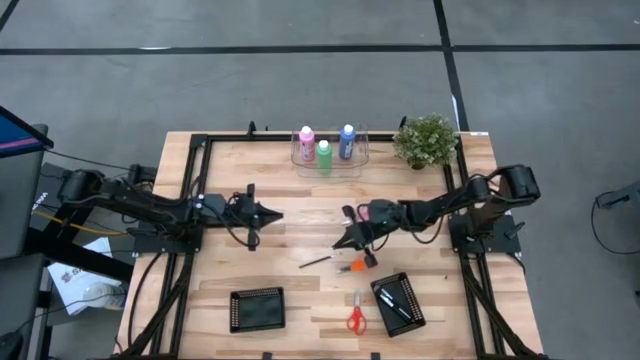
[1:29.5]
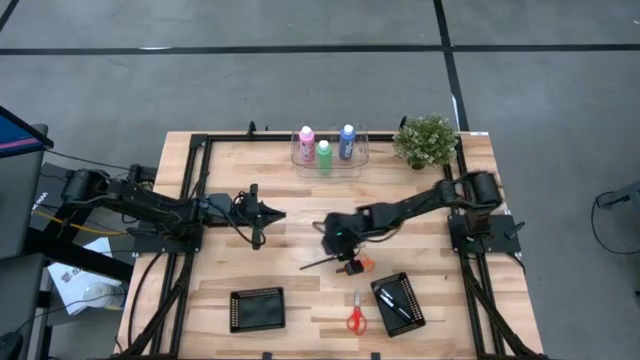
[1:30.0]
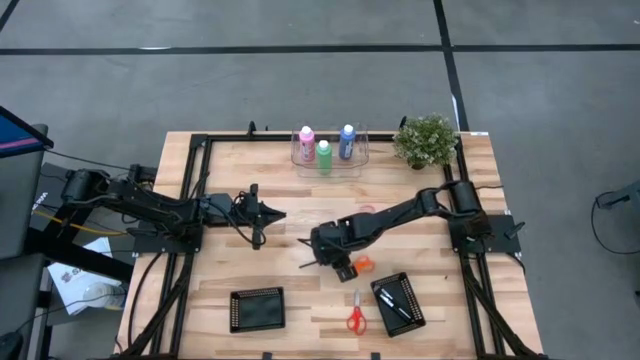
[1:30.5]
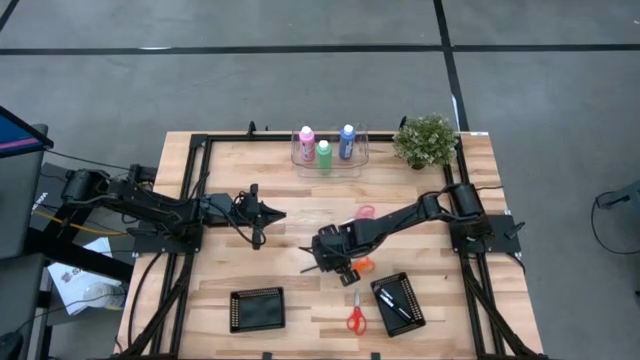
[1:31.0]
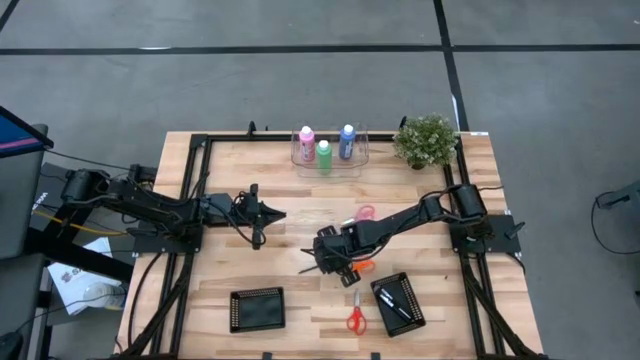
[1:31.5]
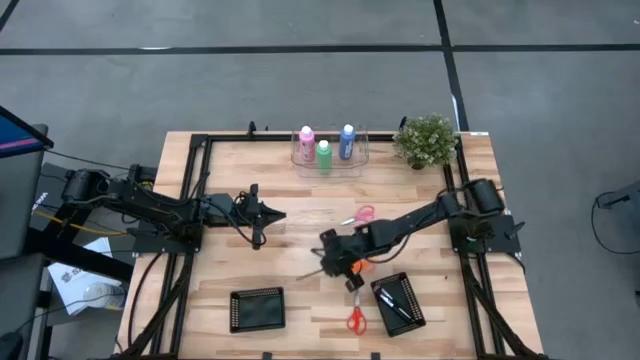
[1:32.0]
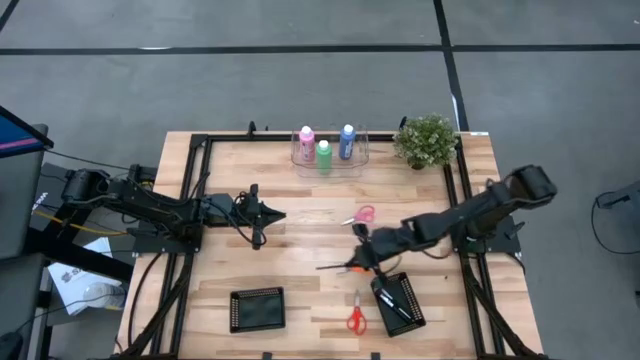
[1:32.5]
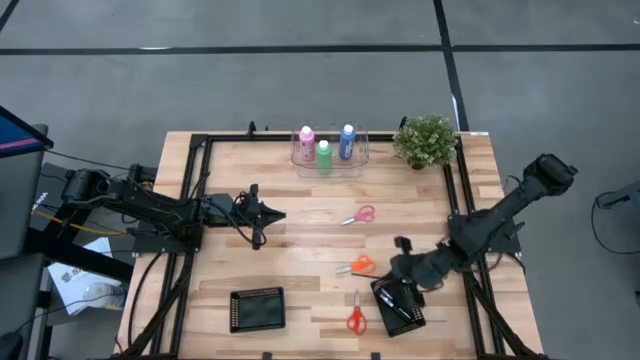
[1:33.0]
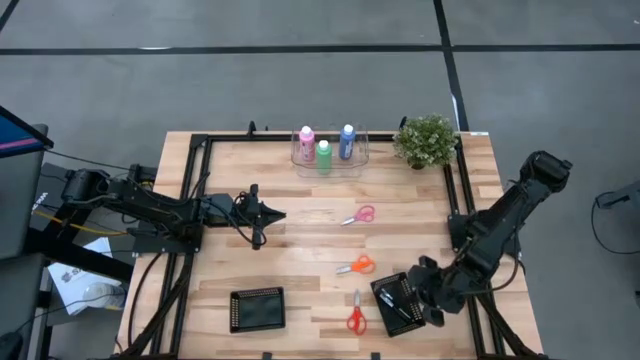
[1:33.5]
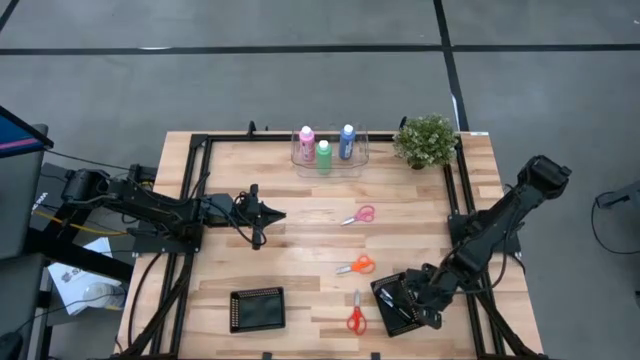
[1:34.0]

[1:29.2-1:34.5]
Task: Pick & Place Paint Supplies
Put the black paint brush into the right black bin

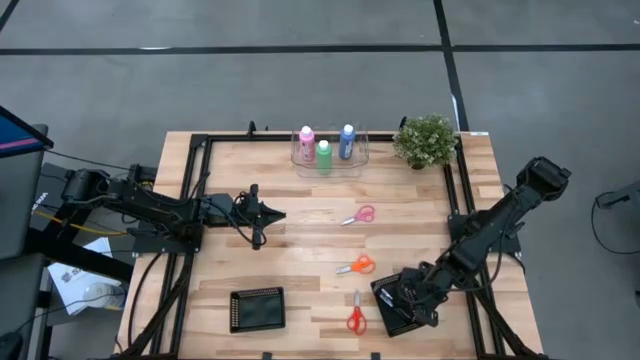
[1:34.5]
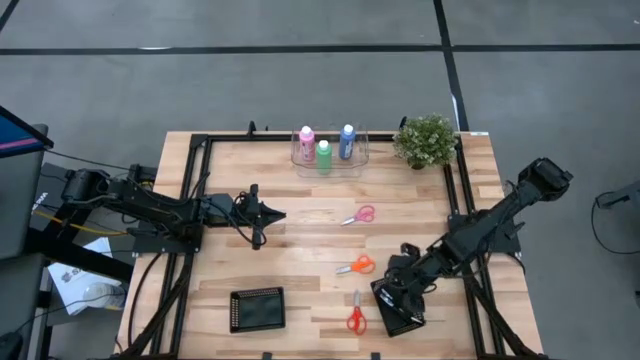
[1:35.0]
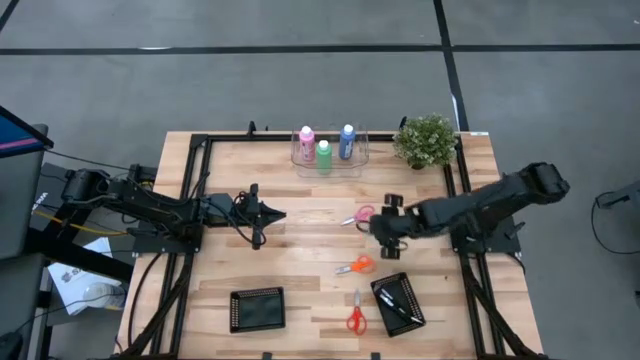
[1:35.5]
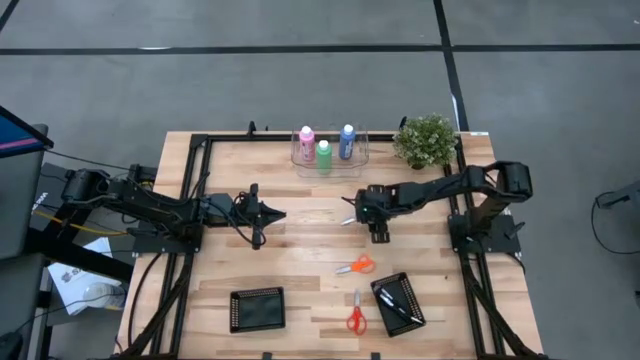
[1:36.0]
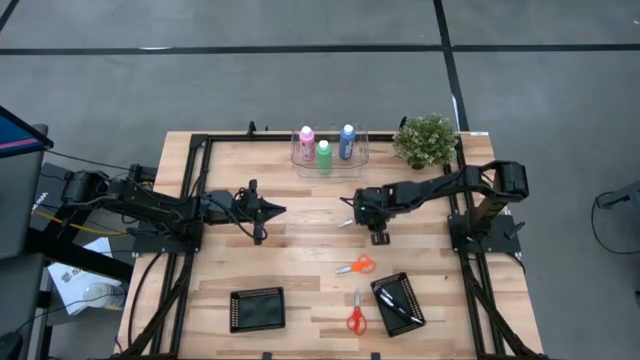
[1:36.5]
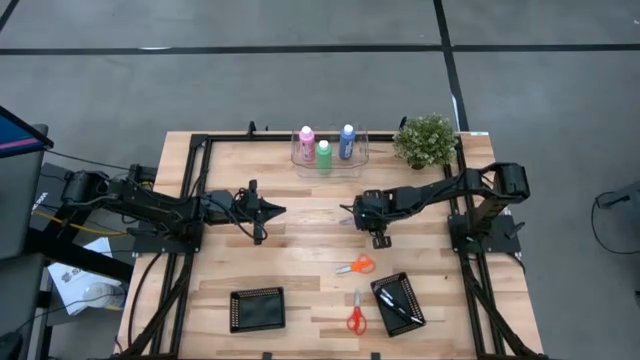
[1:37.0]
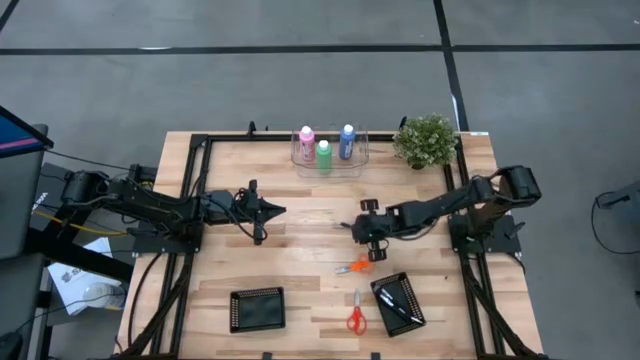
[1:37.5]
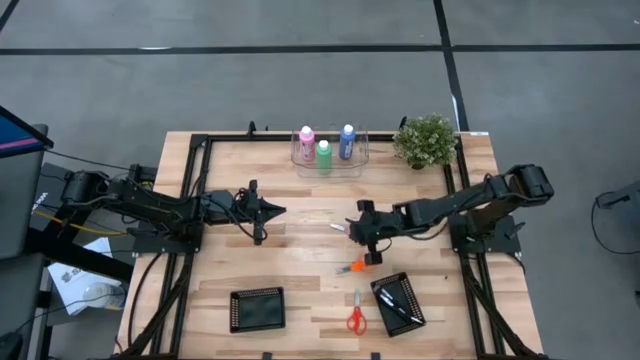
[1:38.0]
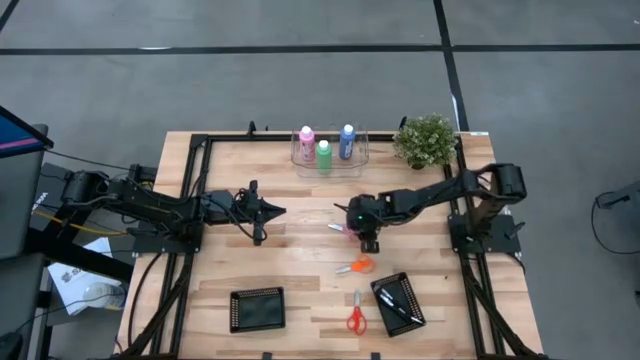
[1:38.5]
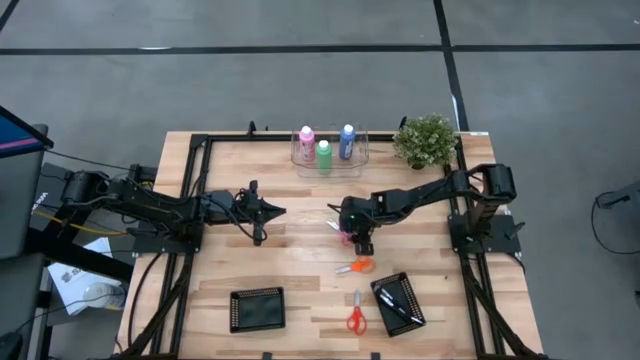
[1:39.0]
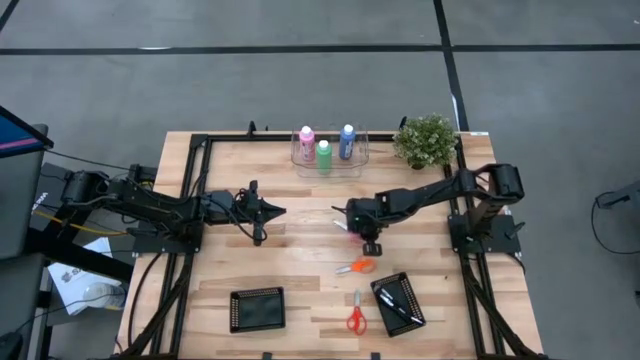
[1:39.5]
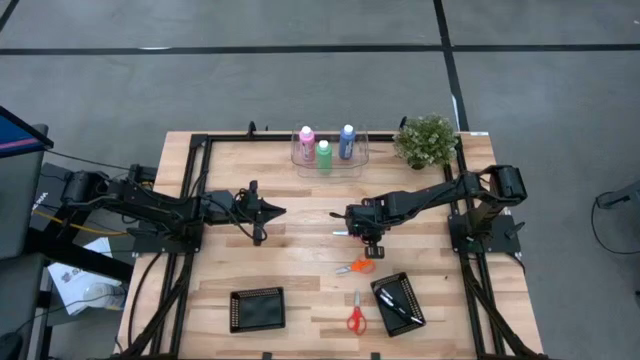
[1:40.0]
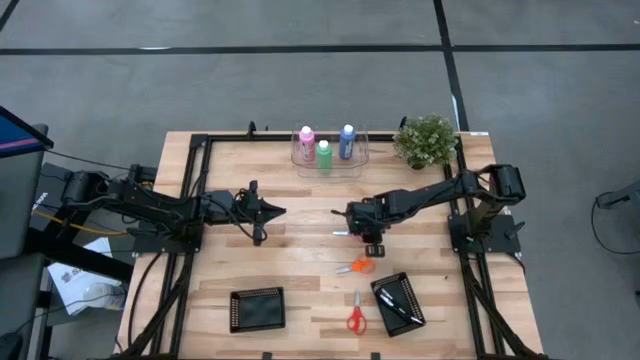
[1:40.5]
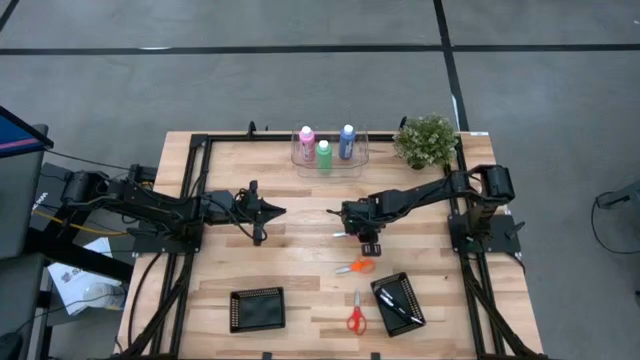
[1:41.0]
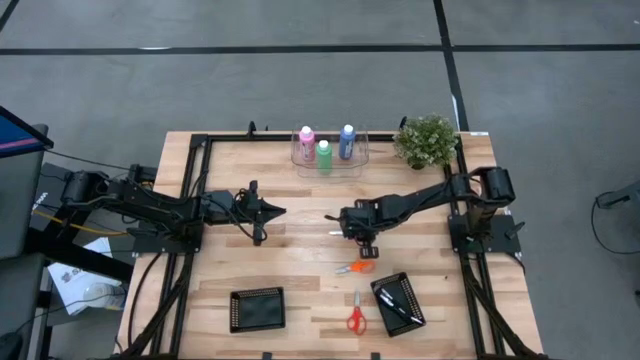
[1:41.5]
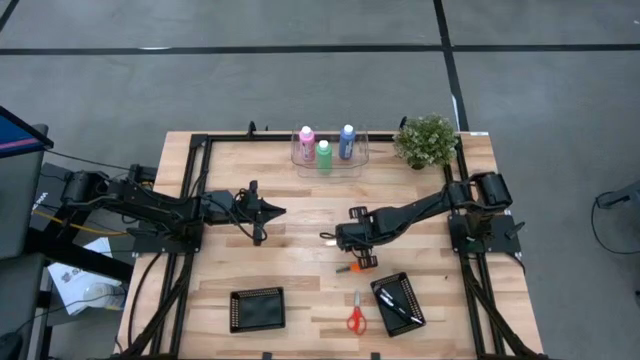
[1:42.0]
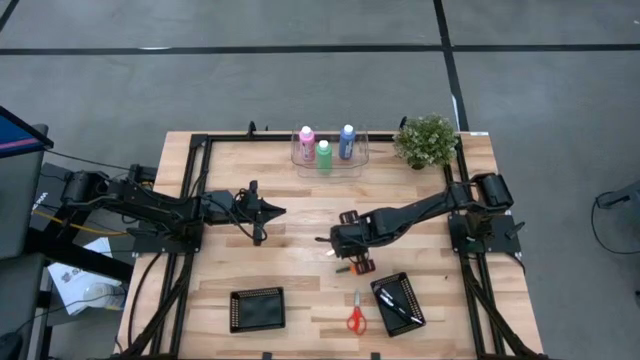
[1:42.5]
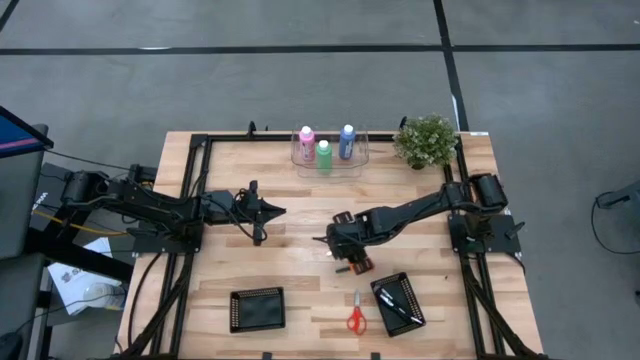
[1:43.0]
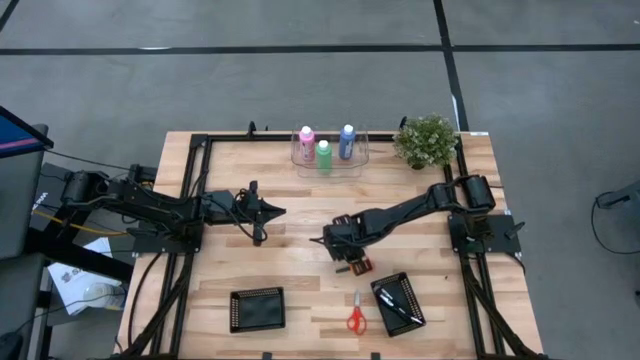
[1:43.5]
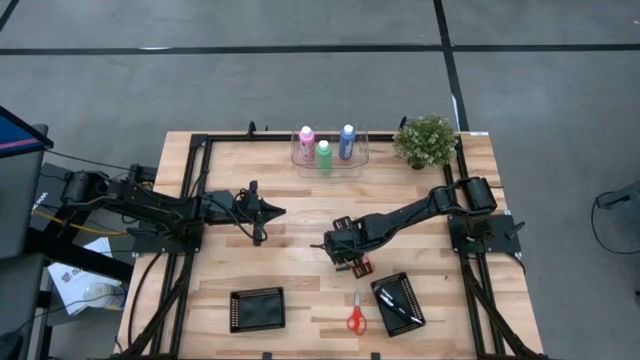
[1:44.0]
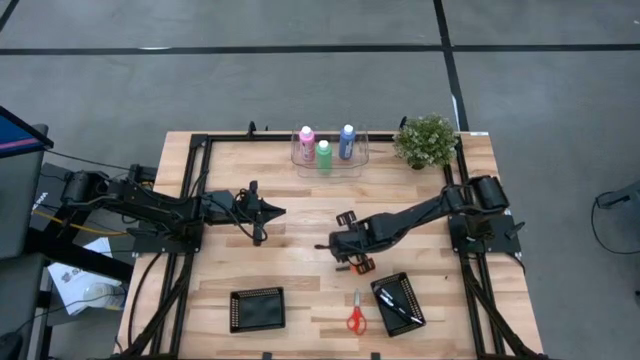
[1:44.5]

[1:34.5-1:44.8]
Put the pink scissors into the left black bin

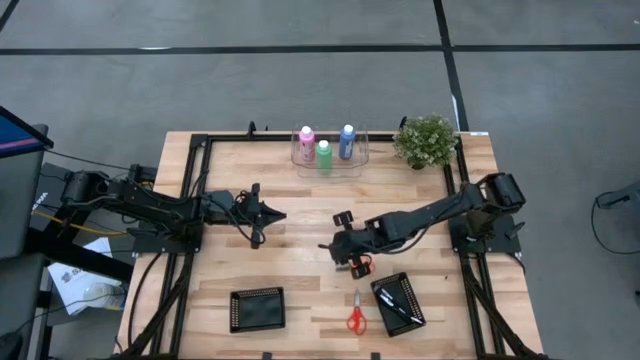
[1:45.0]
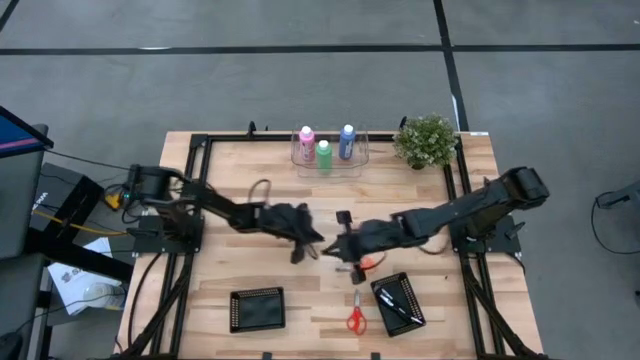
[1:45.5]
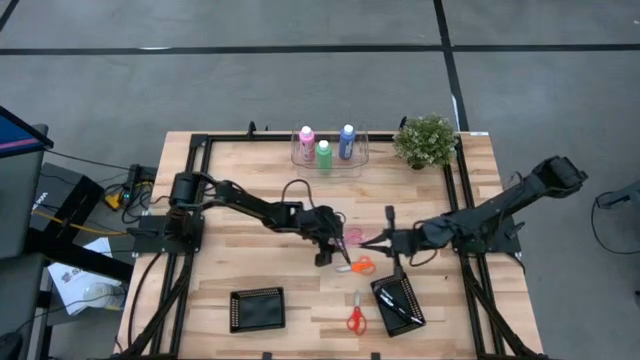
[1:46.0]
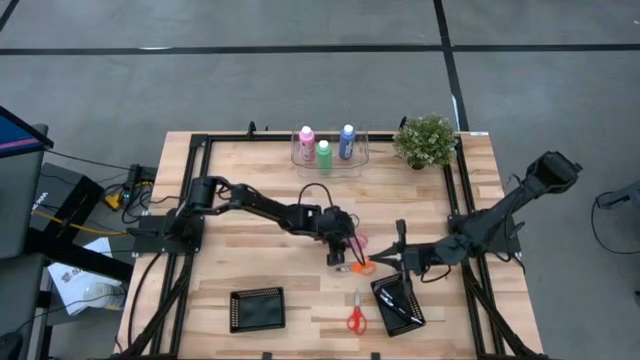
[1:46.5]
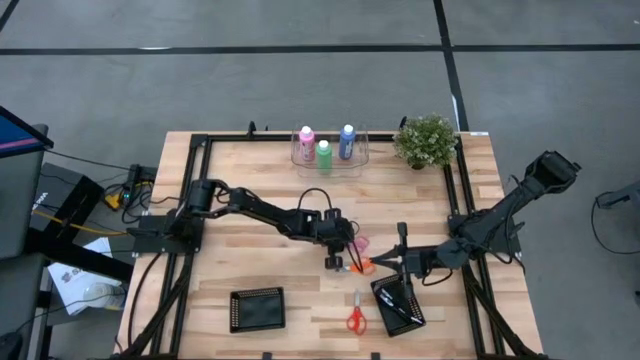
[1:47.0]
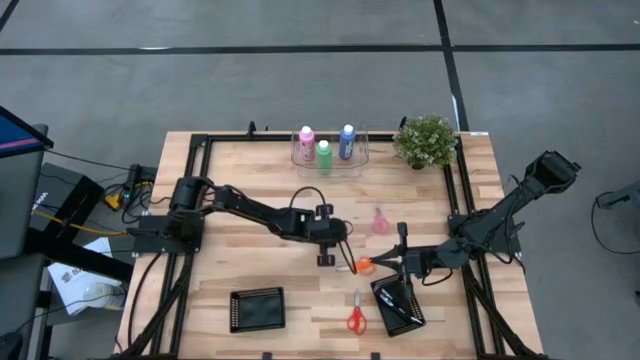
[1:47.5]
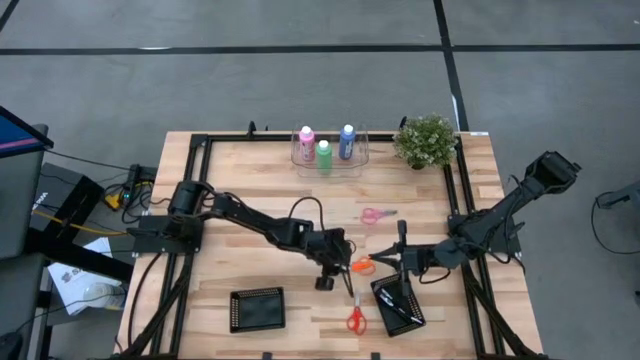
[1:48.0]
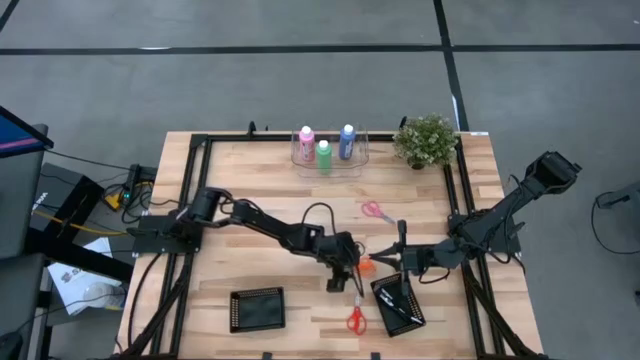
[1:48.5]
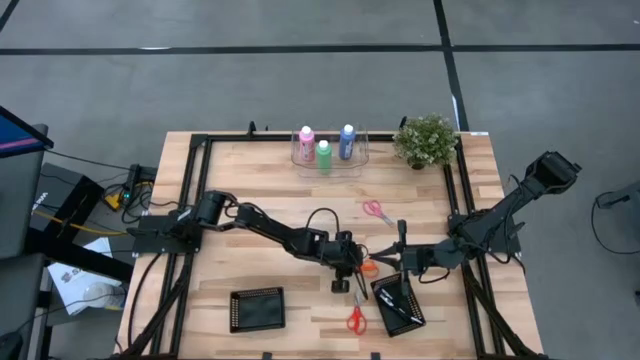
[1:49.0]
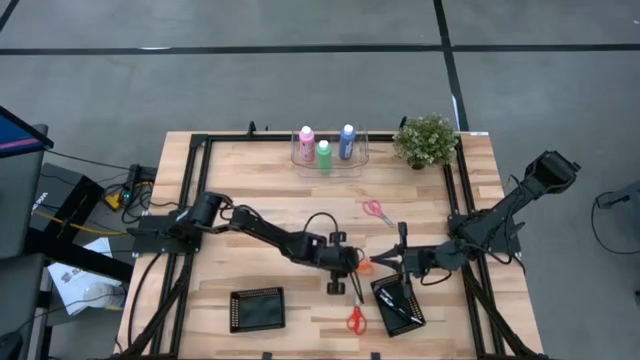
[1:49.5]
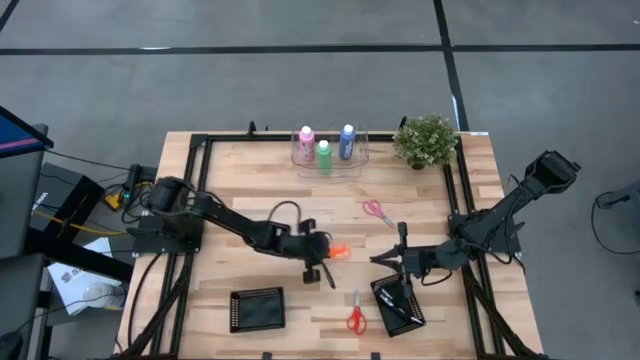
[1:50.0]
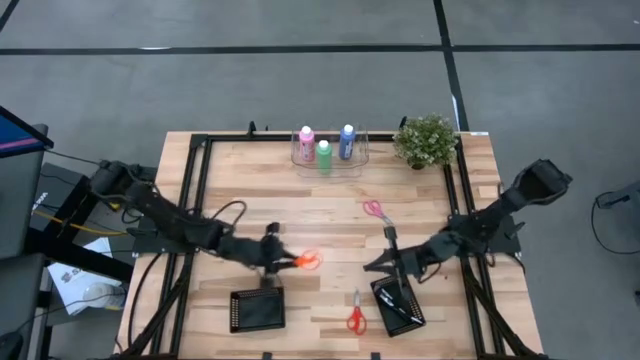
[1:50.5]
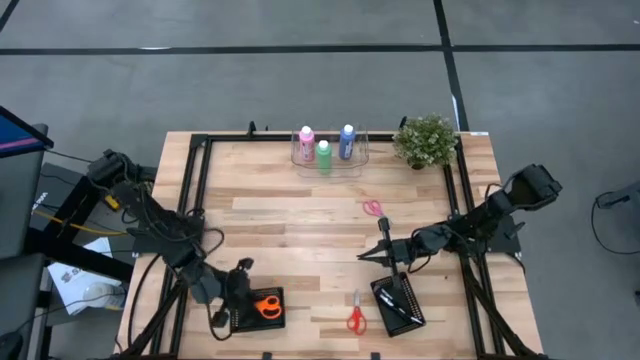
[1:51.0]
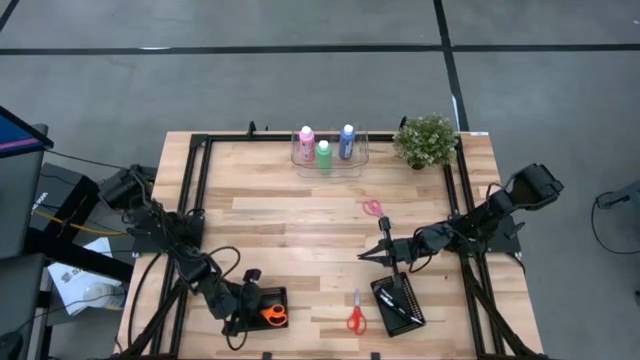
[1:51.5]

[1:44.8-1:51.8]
Put the orange scissors into the left black bin
